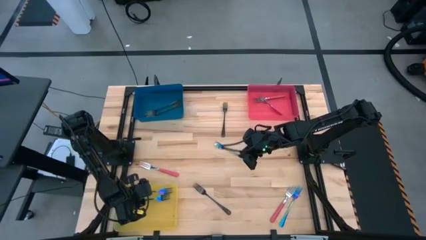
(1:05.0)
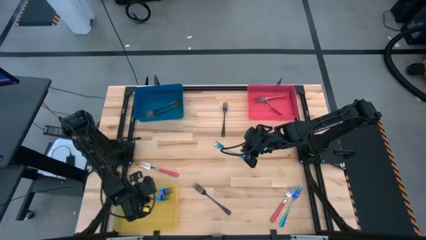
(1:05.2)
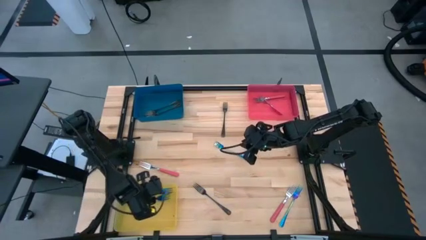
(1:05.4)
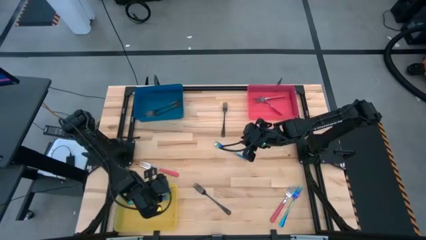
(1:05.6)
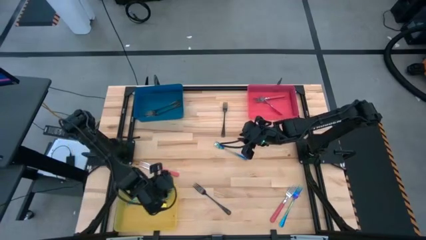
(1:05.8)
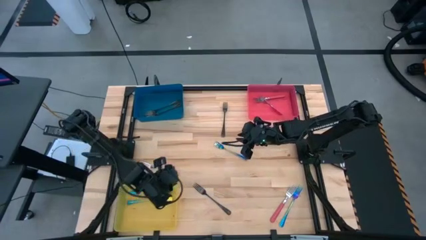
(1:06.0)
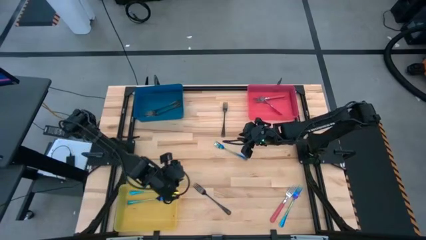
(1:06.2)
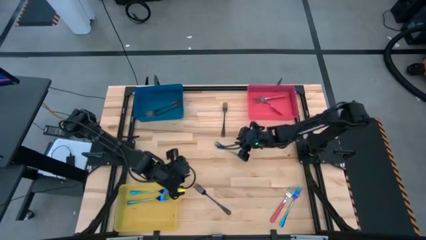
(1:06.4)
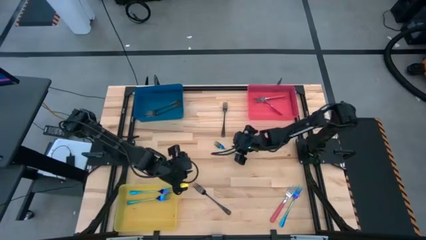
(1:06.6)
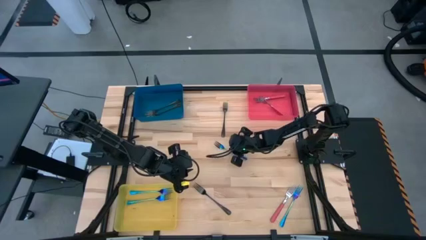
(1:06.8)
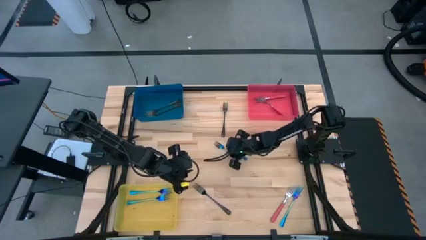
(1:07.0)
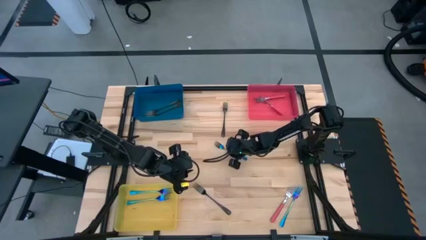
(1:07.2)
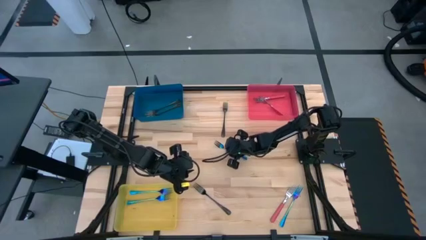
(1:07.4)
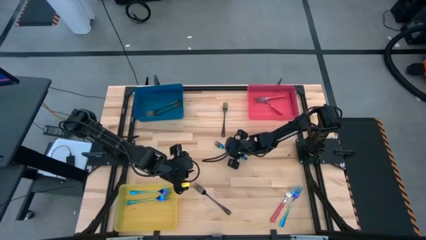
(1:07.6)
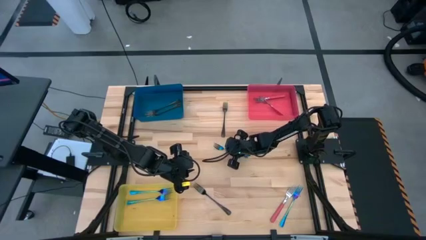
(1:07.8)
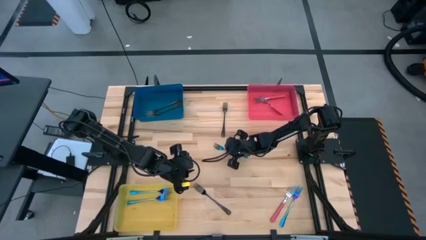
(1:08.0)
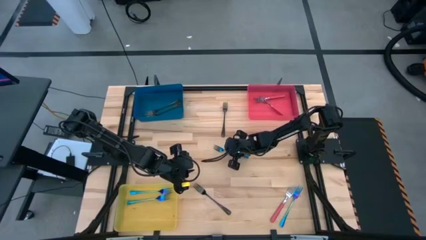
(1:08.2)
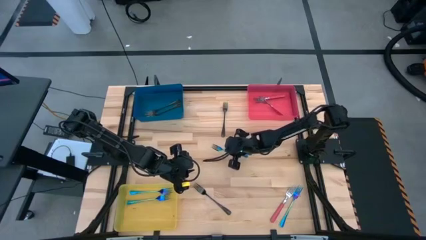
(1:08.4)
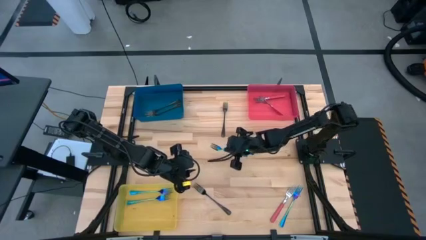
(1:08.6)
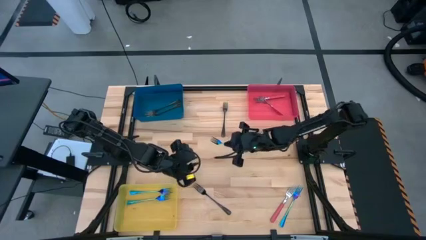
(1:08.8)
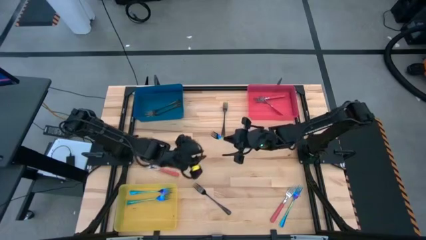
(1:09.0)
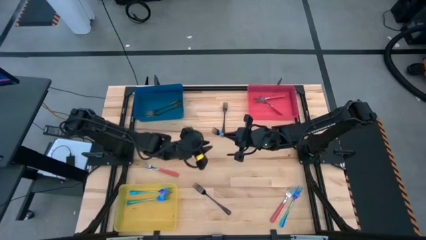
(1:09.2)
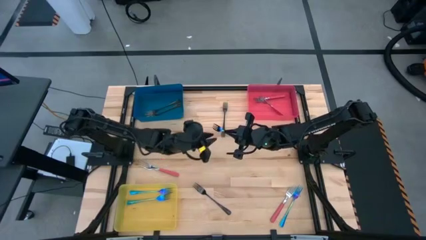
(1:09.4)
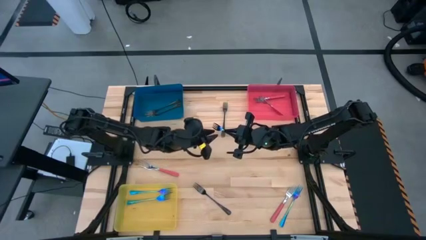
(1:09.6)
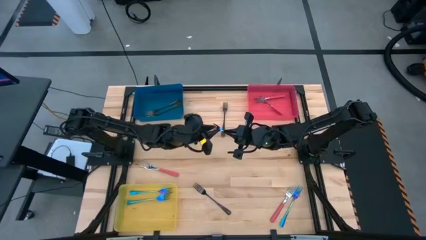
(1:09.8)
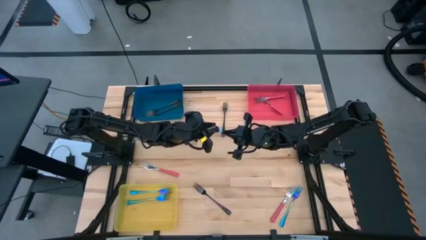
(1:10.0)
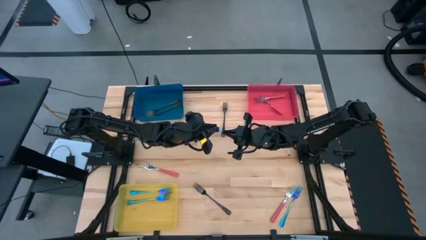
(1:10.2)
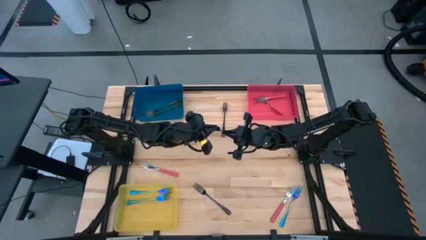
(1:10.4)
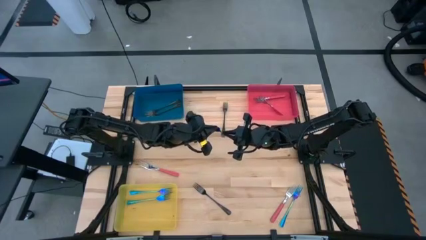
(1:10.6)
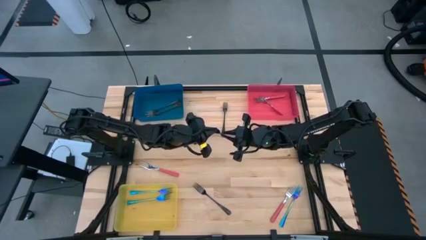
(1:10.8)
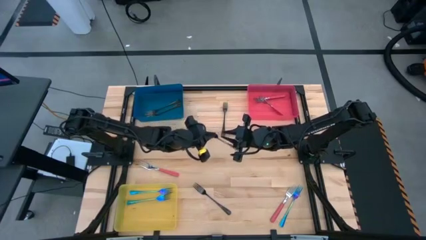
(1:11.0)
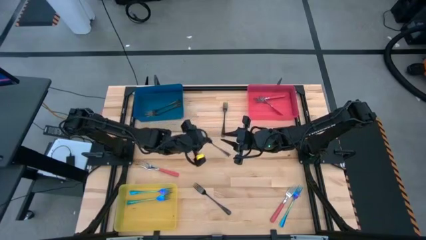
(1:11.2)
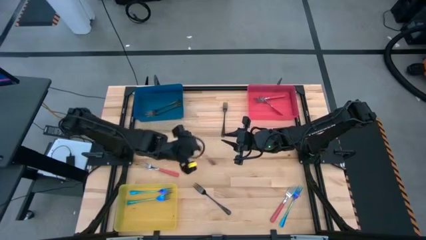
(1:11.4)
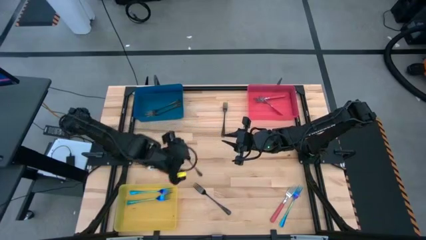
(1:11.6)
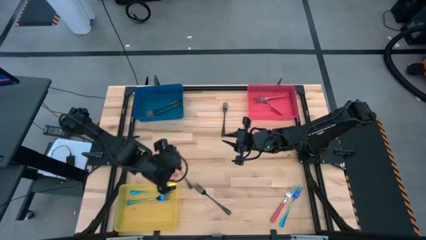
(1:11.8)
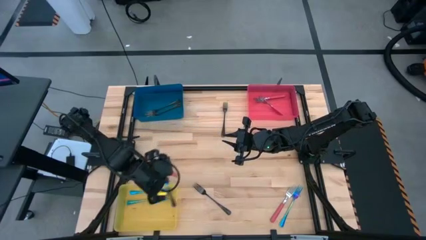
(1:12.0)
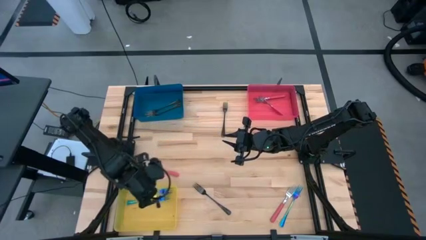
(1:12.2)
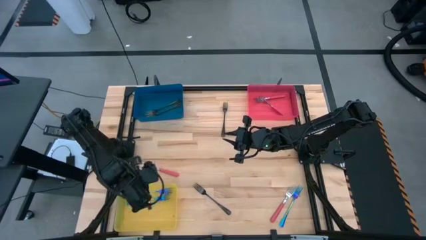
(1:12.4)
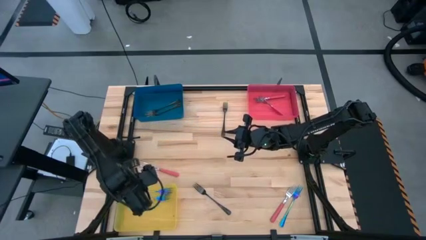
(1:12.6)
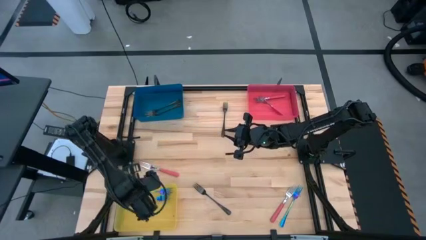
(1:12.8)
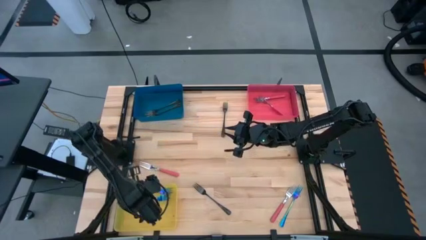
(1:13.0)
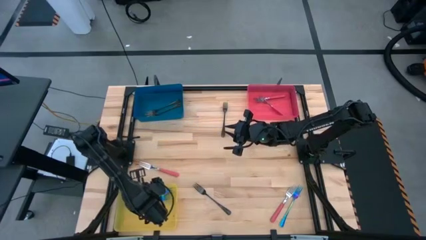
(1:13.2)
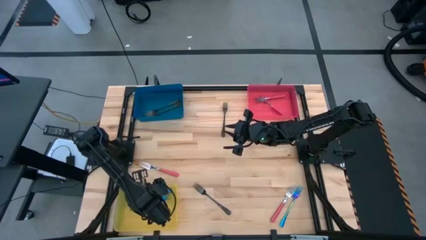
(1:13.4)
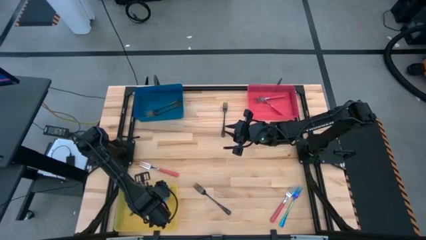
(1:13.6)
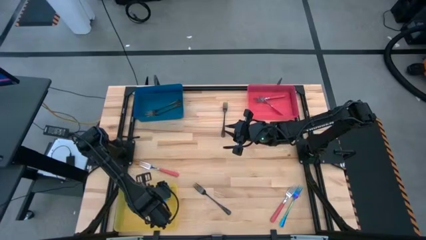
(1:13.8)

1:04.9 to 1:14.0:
Task: Sort silverware by color (type)
Put the top iridescent fork into the yellow bin

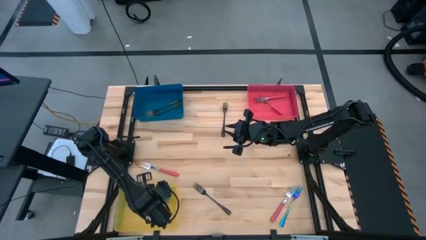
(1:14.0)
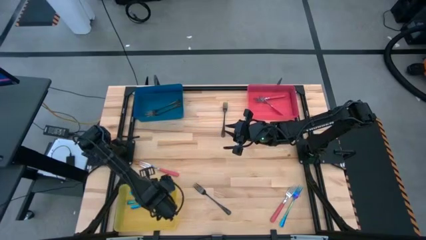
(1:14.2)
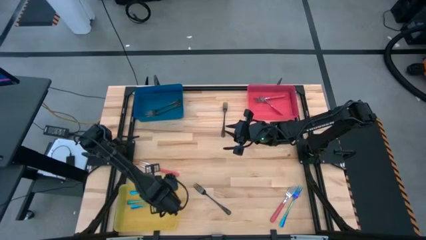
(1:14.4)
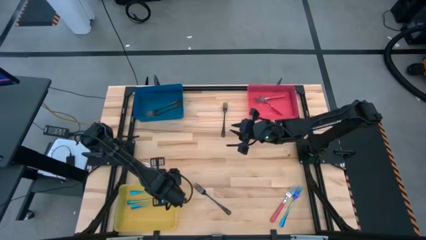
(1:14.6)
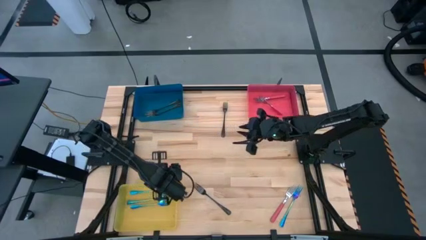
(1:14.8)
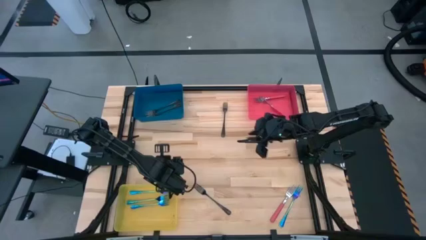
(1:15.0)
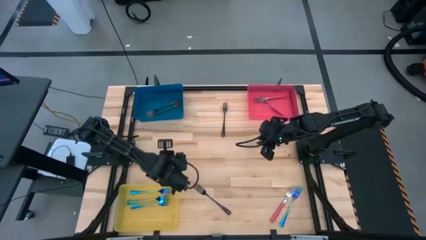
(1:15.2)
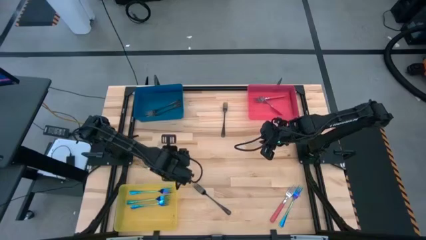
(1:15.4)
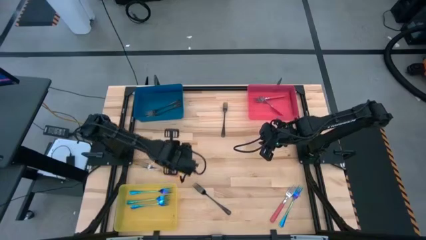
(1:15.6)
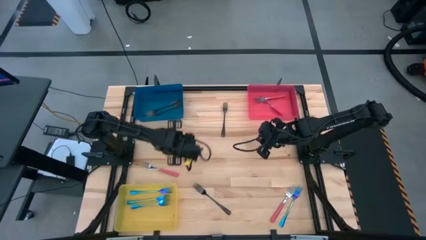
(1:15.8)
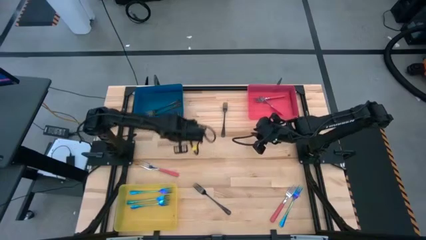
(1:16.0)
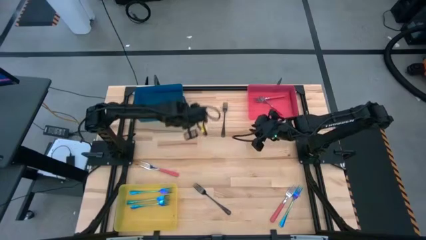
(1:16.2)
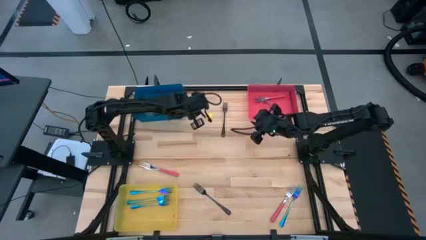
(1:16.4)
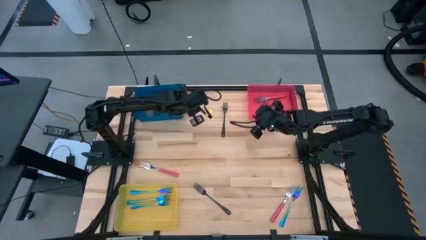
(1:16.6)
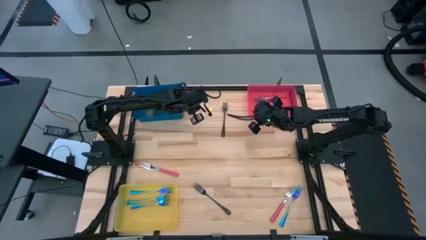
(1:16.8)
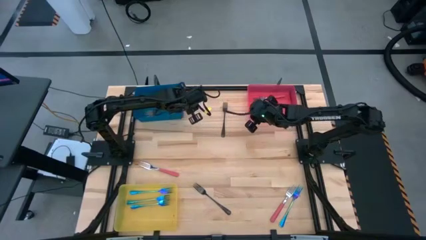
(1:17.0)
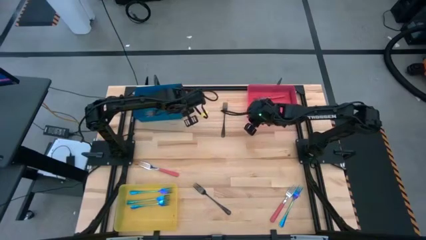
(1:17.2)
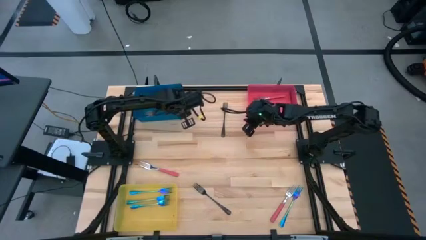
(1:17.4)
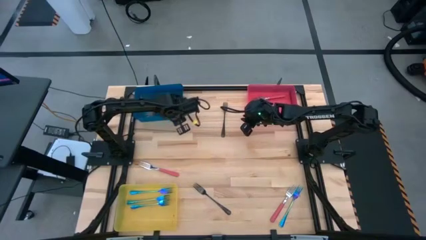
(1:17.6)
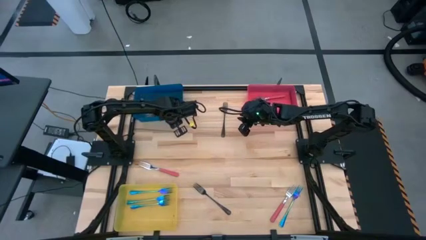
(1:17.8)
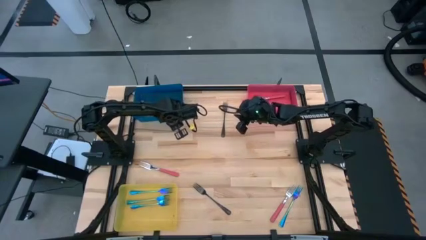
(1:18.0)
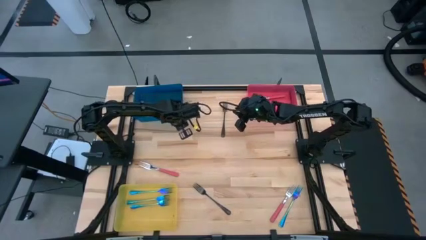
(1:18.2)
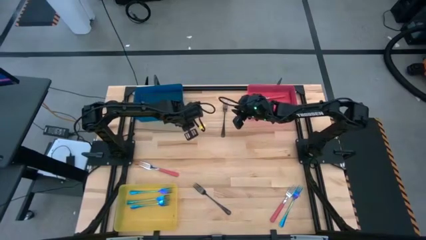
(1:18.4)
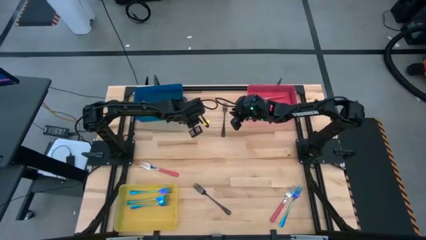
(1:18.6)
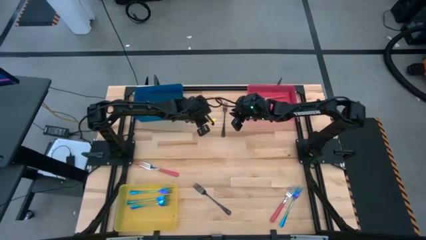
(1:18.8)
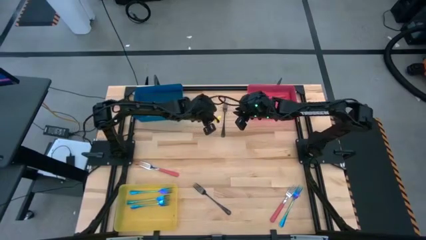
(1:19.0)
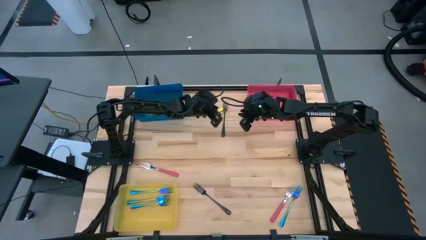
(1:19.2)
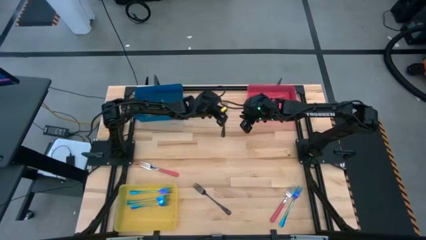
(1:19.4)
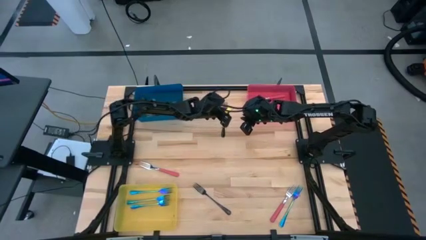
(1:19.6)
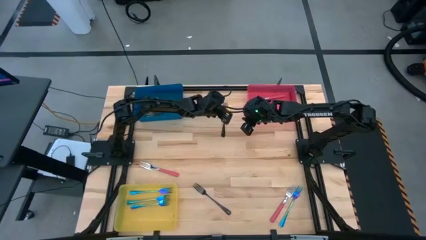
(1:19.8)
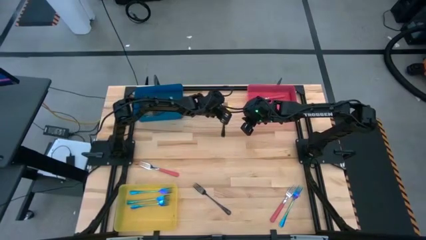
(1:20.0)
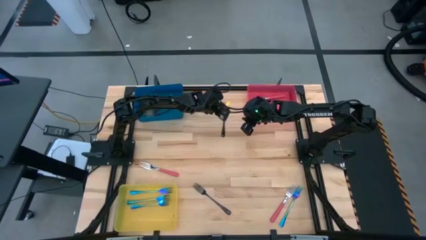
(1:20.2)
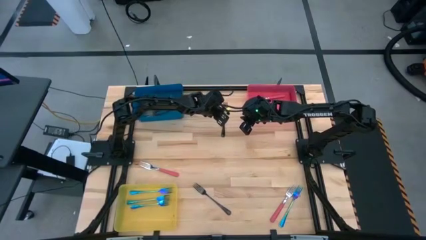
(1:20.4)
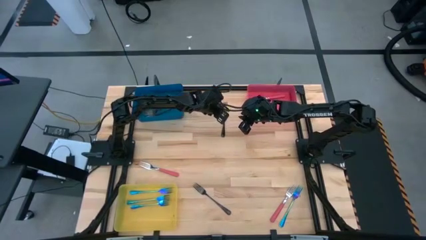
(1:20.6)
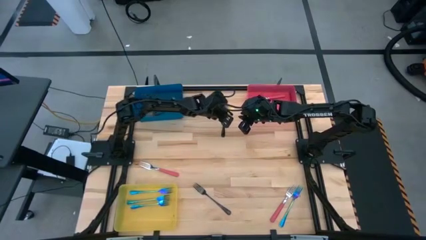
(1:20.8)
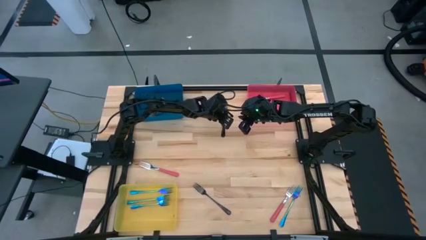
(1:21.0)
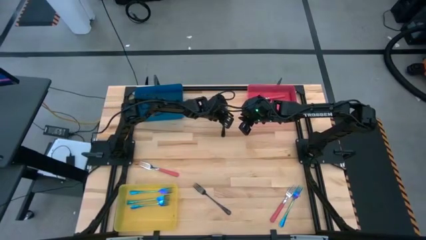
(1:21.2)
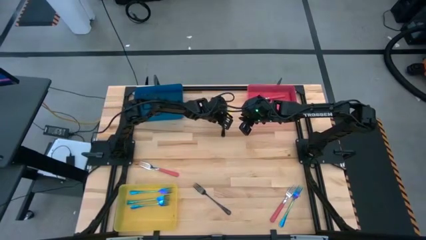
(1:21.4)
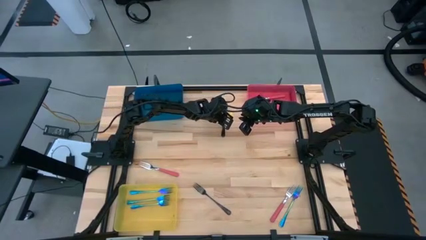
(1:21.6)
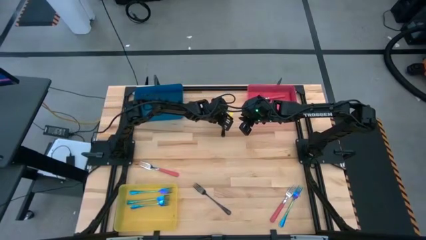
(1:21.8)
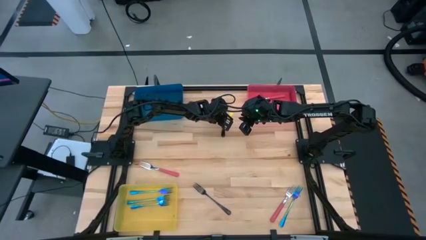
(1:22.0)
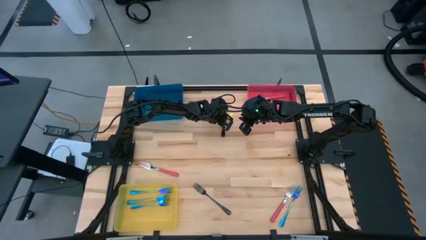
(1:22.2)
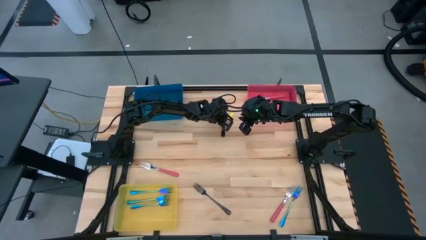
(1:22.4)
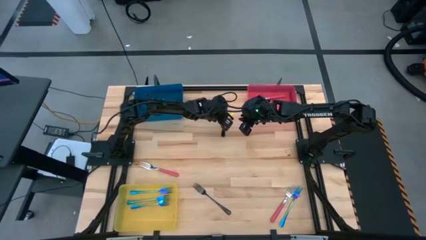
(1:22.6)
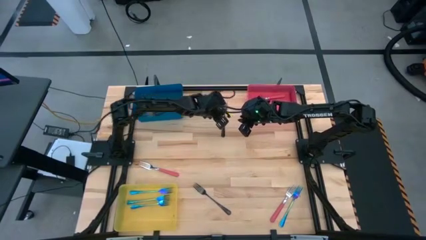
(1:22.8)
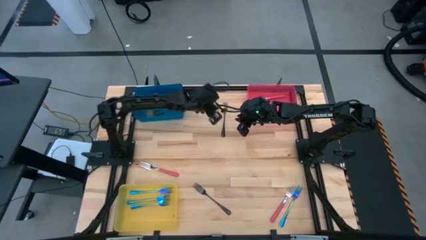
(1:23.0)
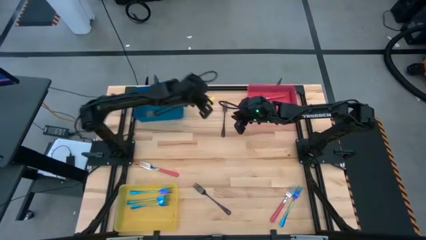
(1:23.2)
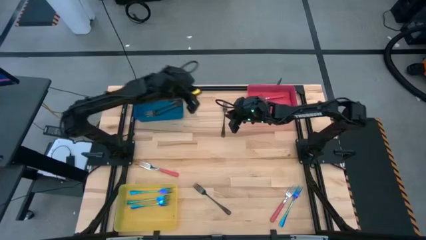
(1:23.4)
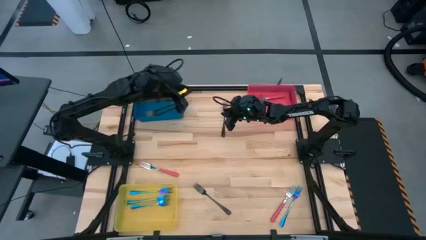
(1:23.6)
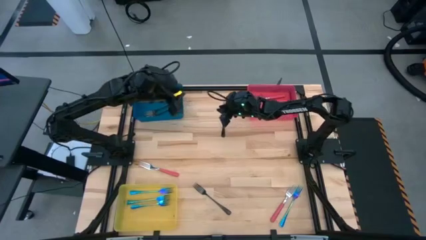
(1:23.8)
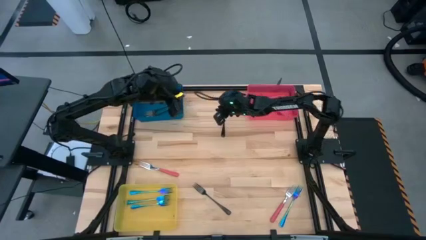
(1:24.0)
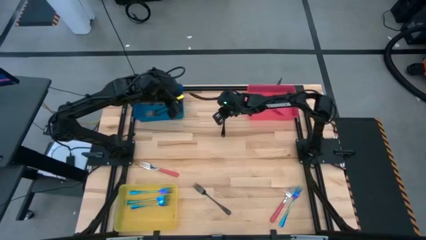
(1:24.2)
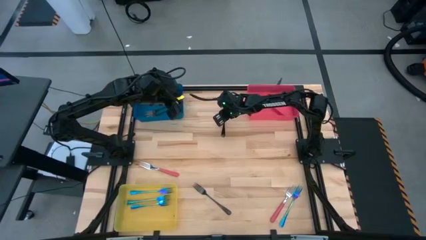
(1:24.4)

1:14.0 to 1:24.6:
Put the top black fork into the blue bin
